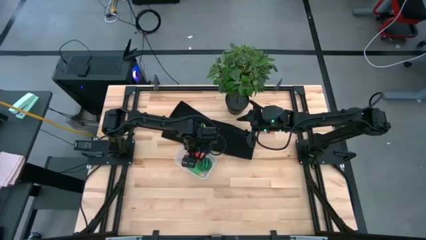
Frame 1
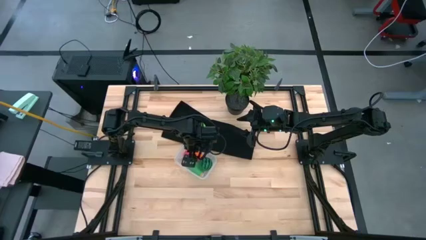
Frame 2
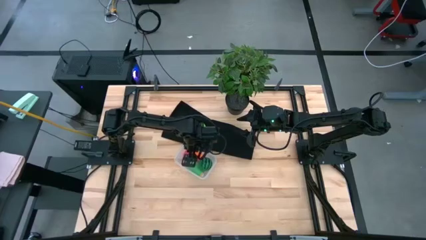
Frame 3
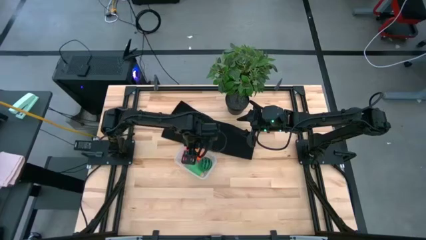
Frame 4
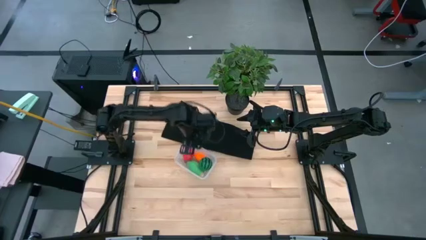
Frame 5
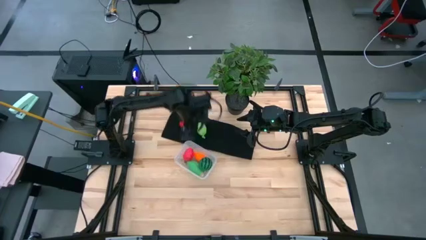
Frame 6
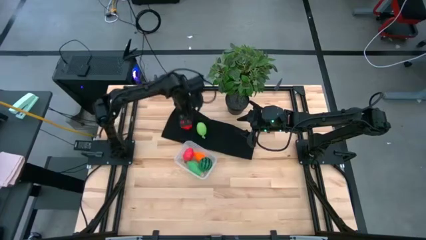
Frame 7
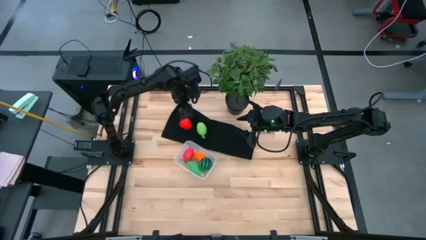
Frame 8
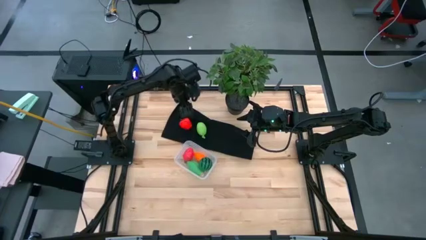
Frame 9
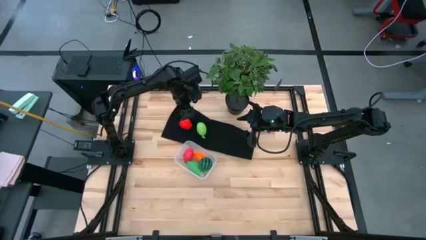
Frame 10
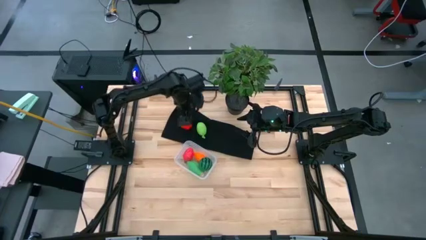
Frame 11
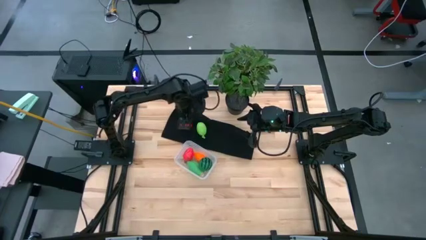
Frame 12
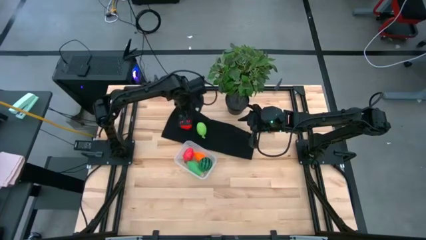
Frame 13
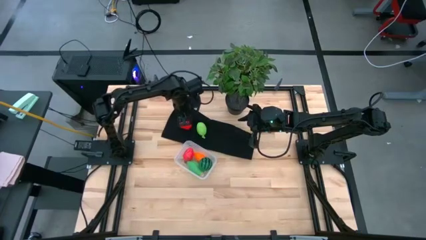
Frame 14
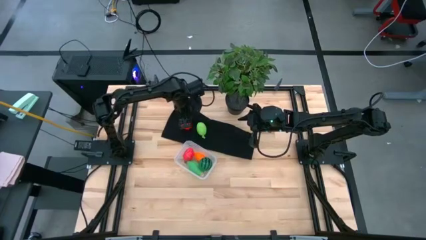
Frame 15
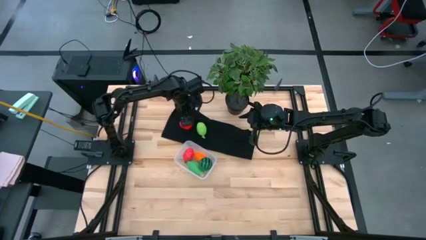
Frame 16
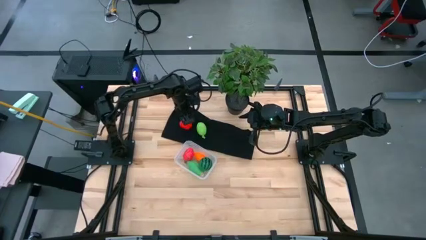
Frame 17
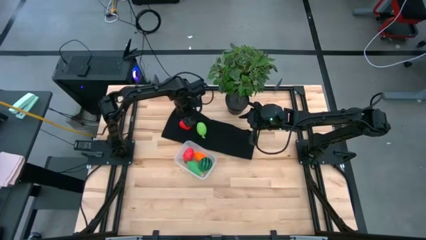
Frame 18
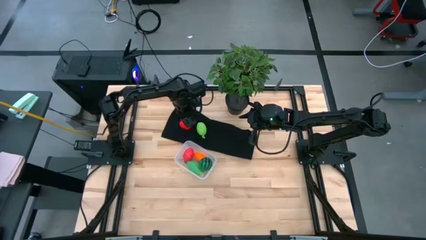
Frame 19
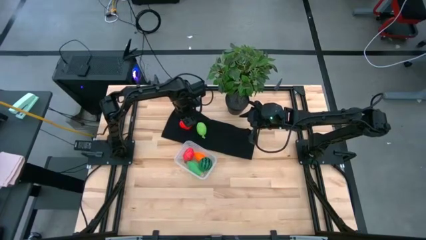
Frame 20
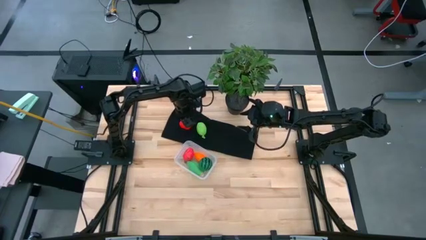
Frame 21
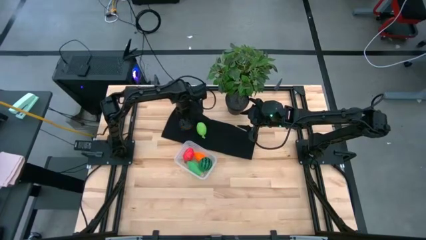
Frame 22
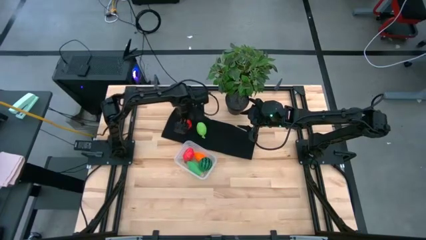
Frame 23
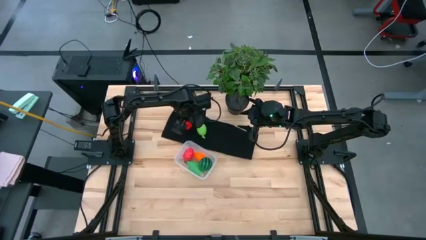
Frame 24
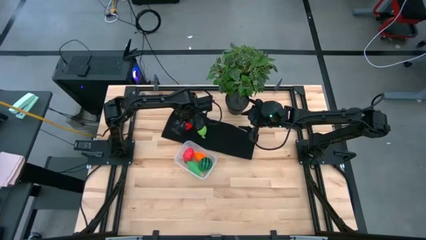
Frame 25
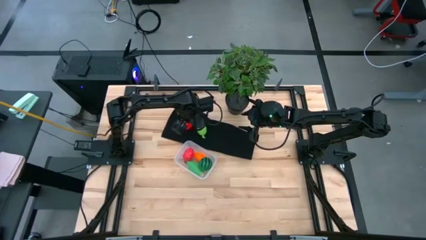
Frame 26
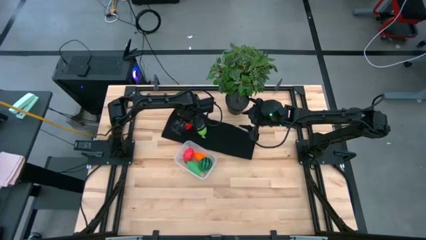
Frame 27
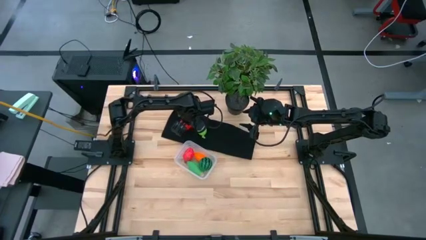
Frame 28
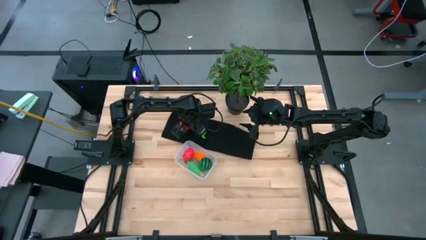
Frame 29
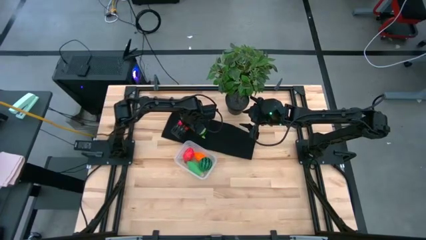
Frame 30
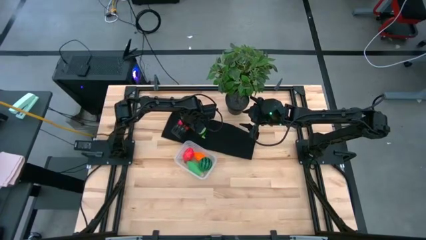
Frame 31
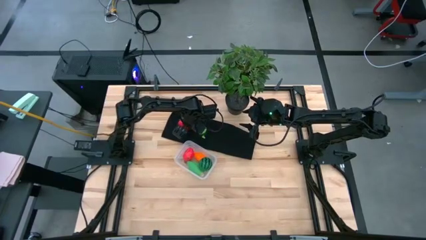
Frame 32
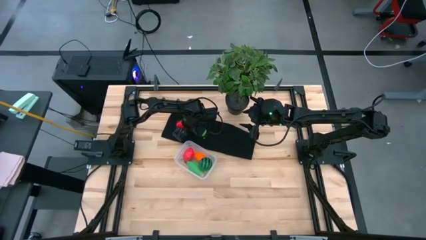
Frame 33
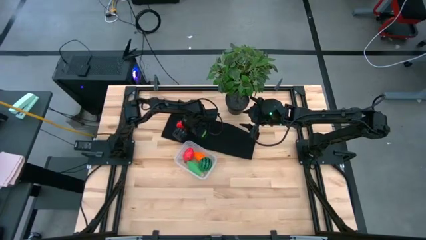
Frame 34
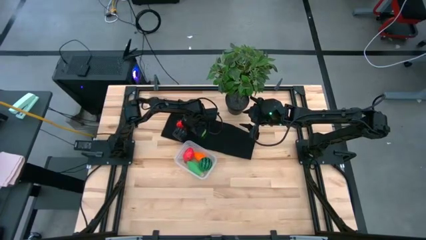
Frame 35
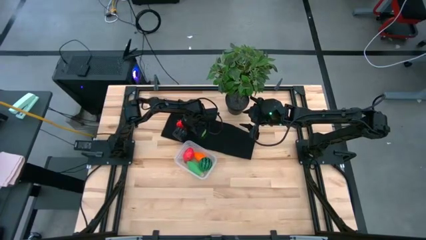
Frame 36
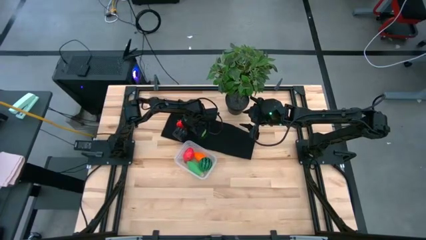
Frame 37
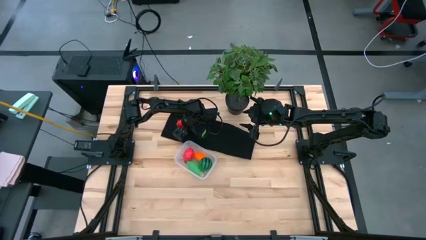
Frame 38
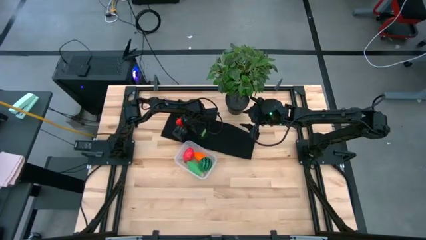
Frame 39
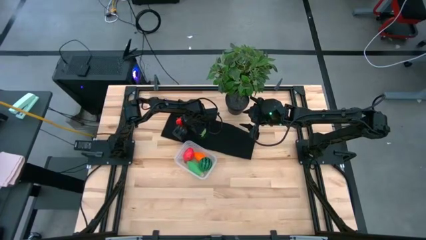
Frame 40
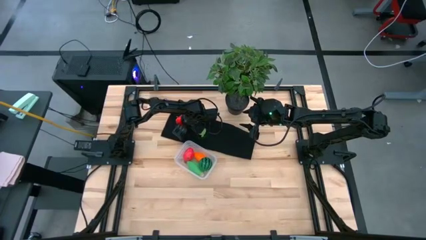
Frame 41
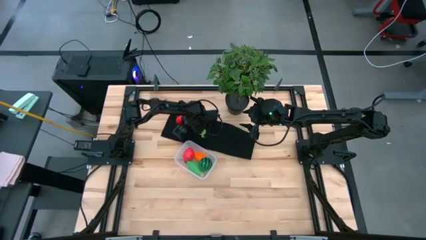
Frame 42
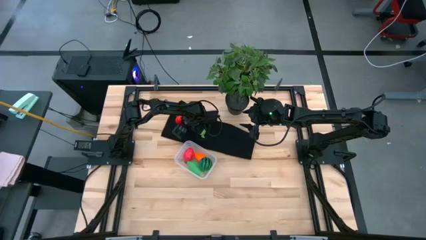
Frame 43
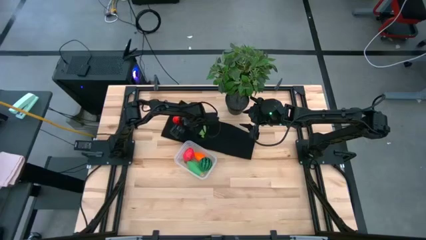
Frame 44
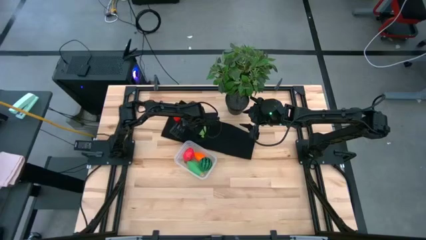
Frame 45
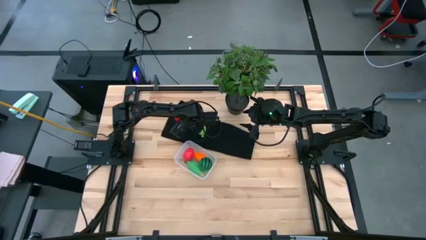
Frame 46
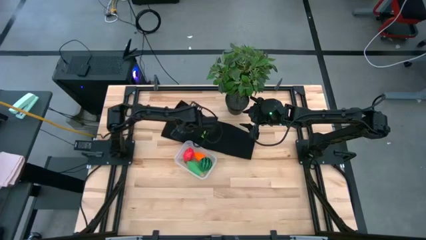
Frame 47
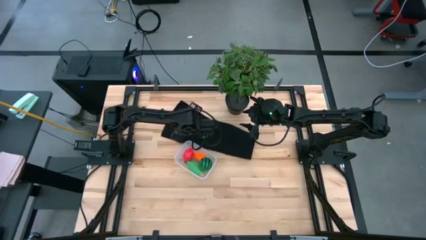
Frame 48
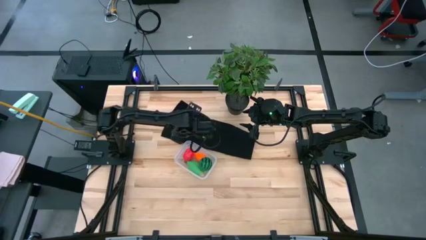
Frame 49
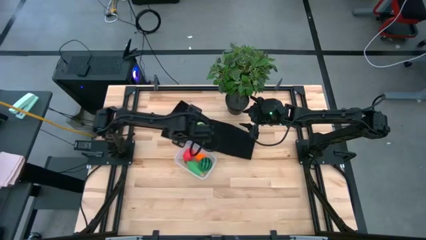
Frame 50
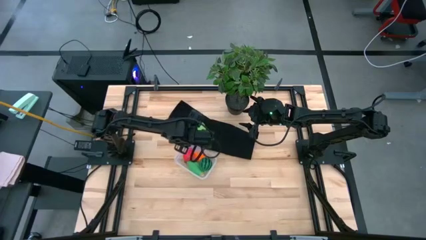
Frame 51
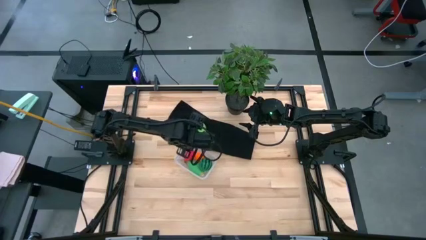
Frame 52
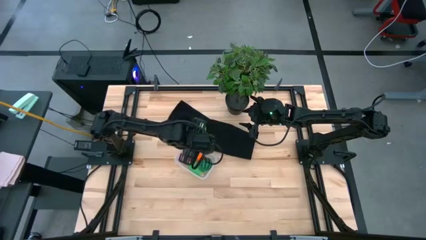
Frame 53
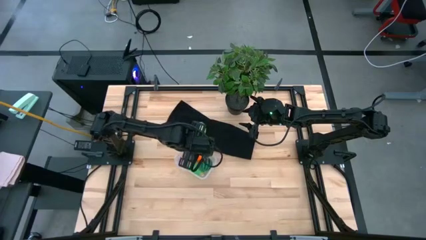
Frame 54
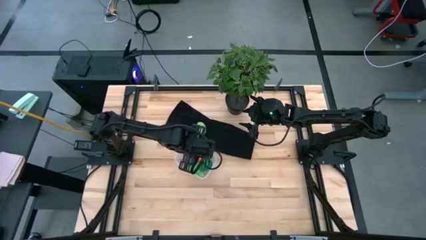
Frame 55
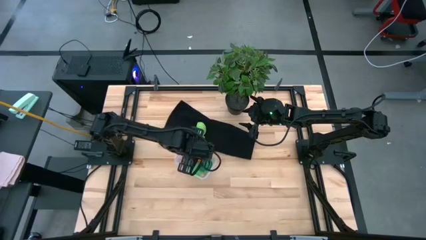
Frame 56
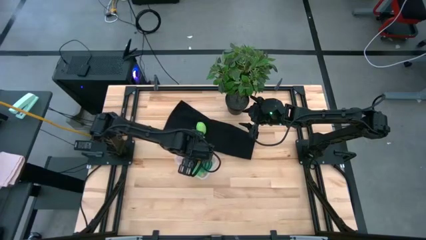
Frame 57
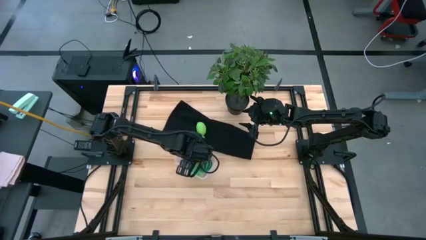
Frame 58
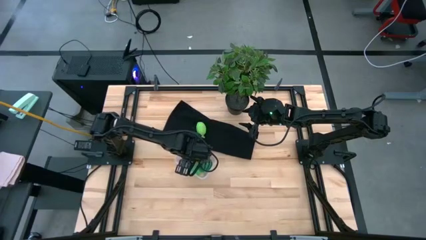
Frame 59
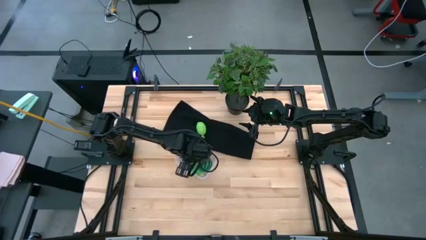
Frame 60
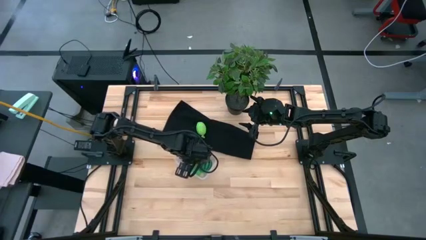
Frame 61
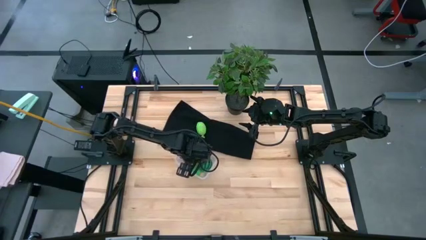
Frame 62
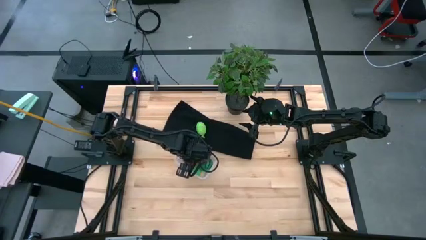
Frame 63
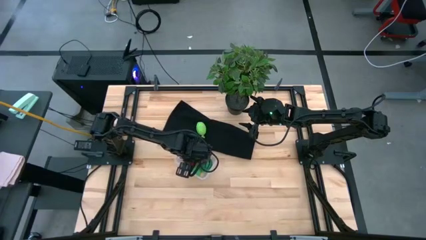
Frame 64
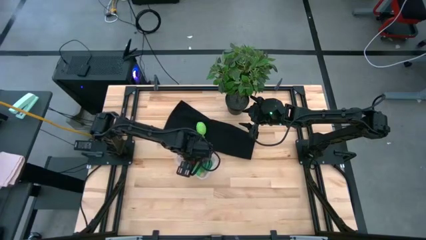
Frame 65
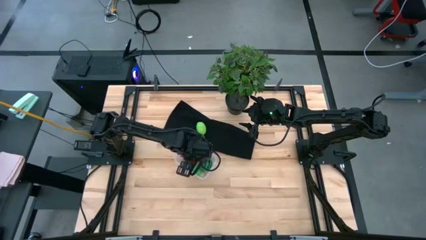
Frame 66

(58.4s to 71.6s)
Task: Pick and placing Produce into tupperware
Put the red apple into the transparent bin
